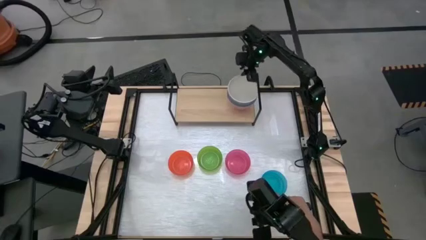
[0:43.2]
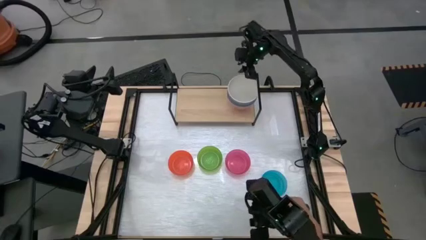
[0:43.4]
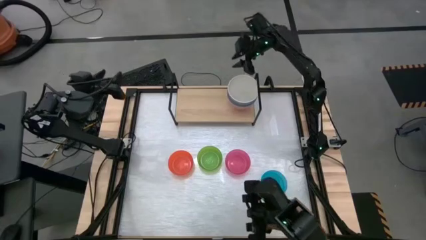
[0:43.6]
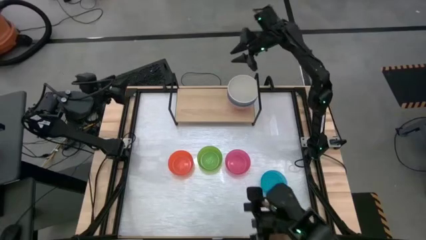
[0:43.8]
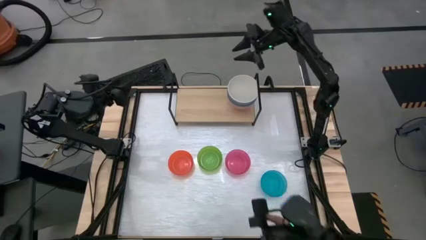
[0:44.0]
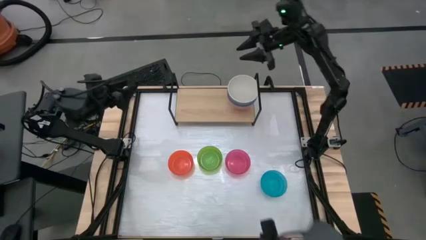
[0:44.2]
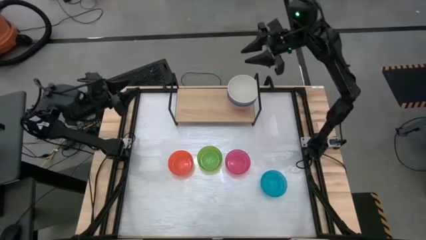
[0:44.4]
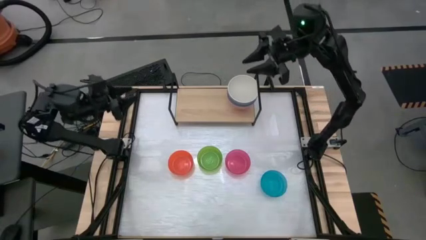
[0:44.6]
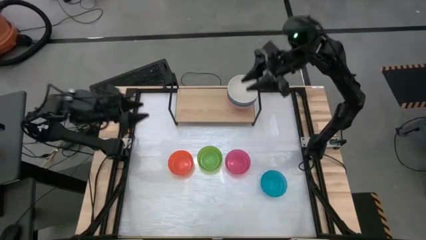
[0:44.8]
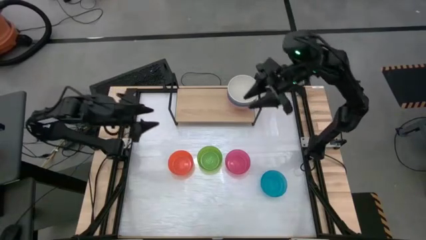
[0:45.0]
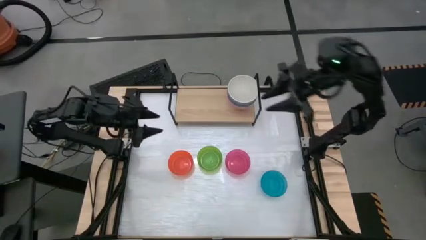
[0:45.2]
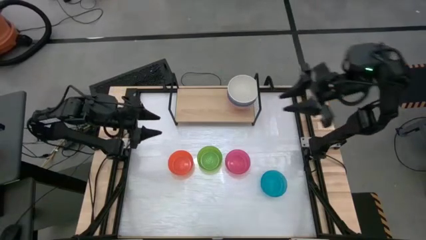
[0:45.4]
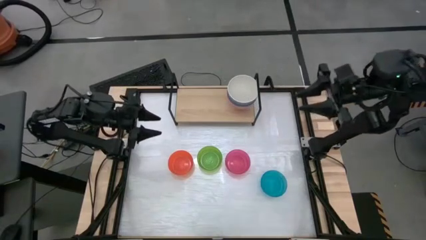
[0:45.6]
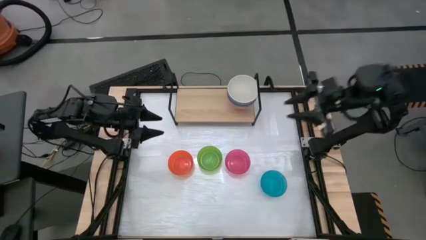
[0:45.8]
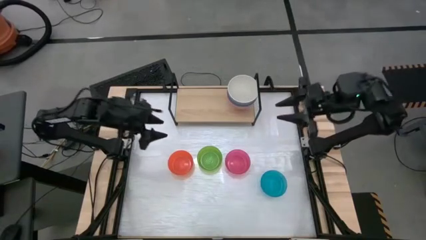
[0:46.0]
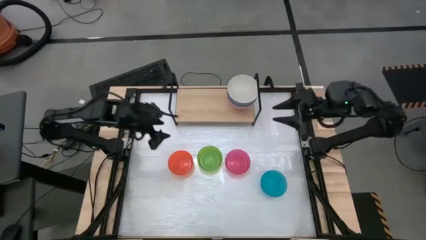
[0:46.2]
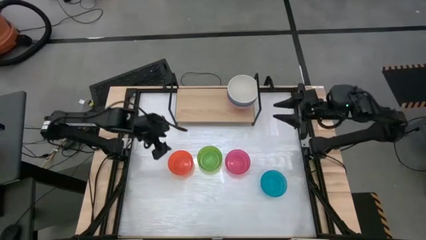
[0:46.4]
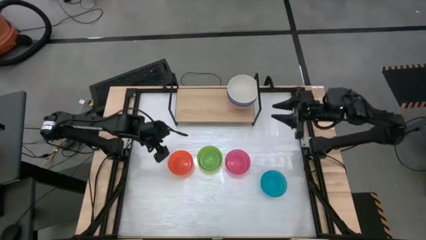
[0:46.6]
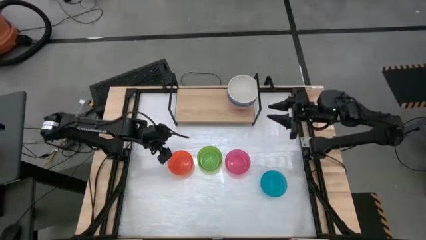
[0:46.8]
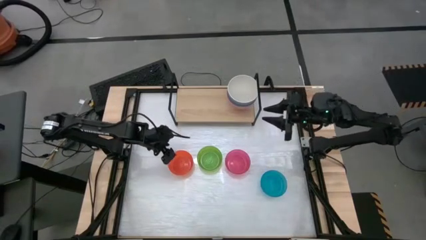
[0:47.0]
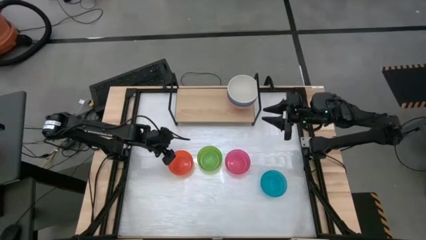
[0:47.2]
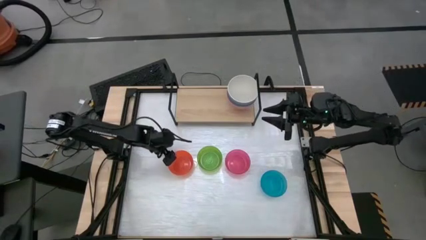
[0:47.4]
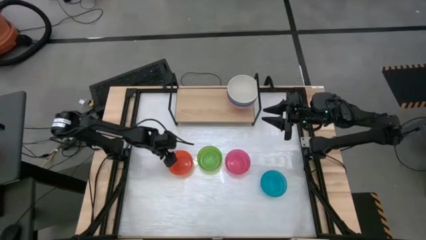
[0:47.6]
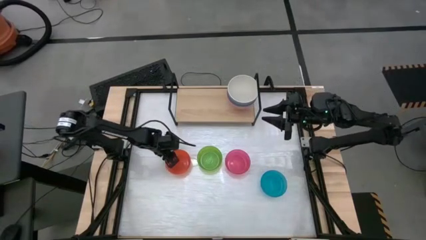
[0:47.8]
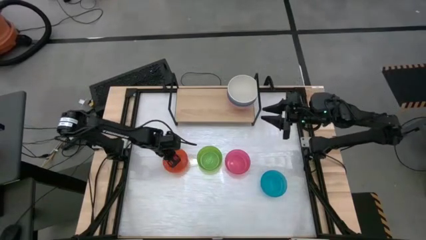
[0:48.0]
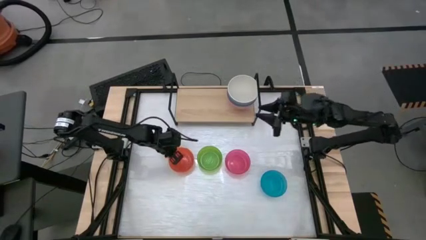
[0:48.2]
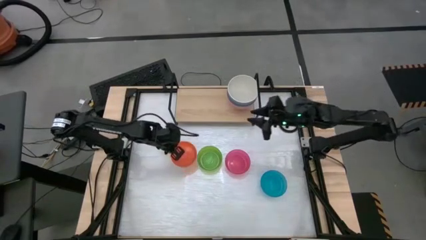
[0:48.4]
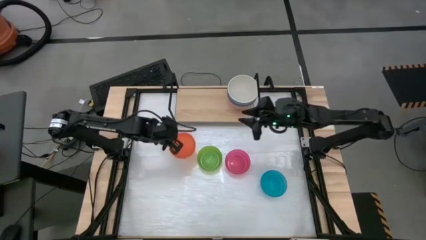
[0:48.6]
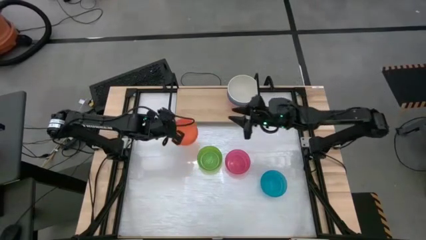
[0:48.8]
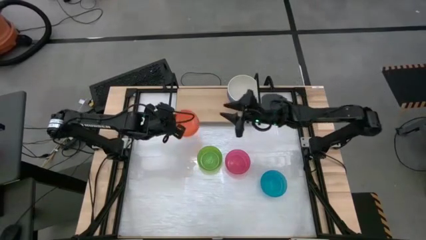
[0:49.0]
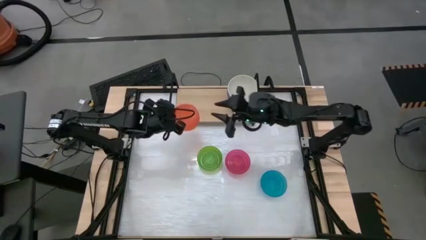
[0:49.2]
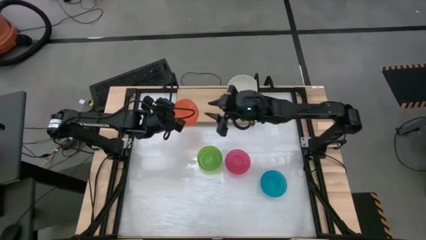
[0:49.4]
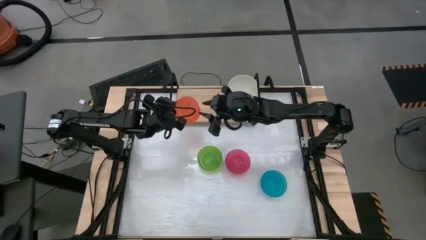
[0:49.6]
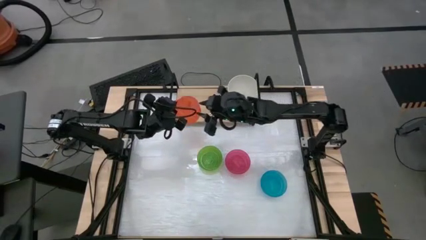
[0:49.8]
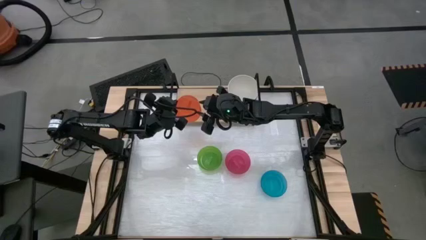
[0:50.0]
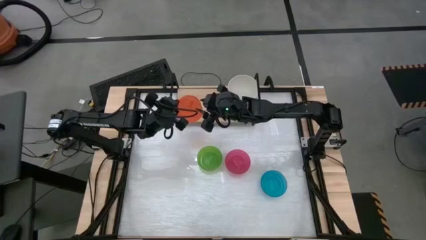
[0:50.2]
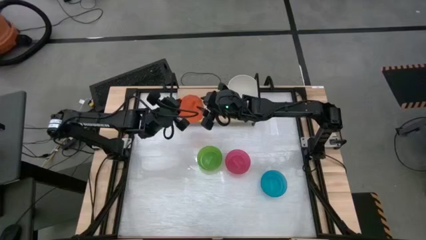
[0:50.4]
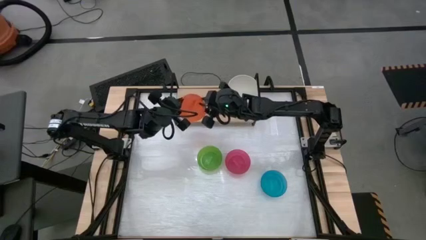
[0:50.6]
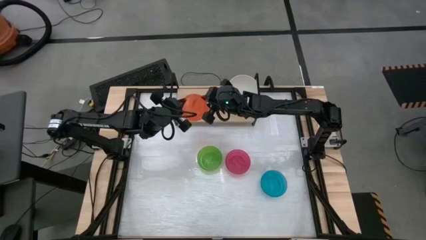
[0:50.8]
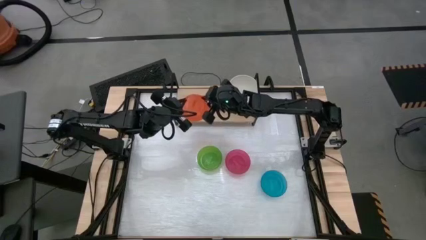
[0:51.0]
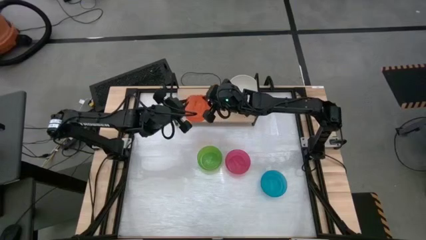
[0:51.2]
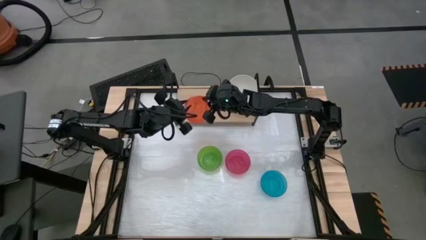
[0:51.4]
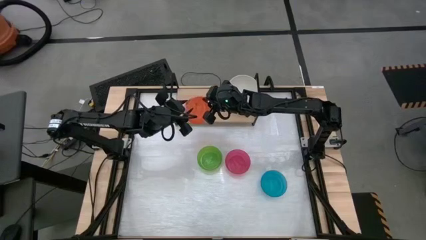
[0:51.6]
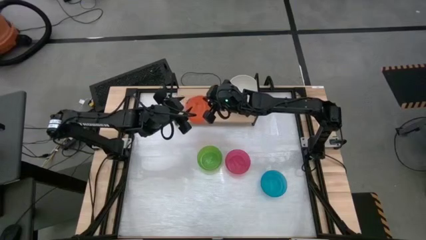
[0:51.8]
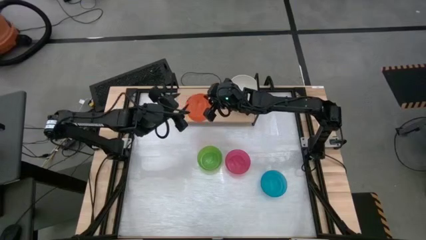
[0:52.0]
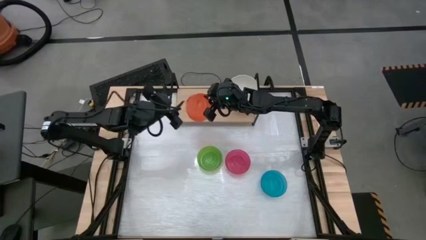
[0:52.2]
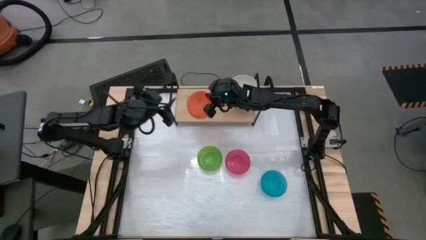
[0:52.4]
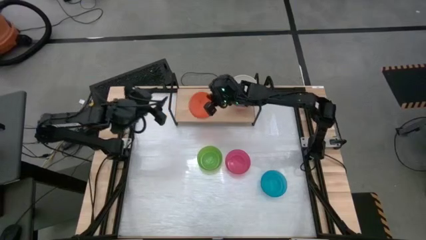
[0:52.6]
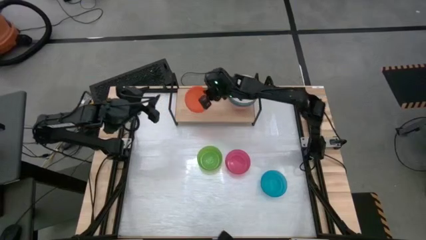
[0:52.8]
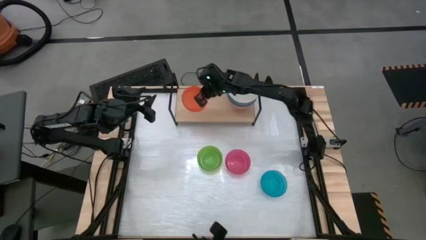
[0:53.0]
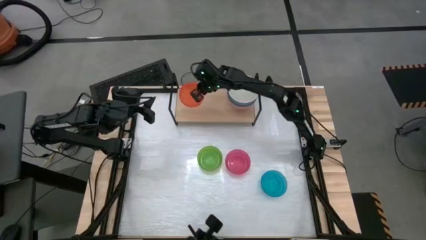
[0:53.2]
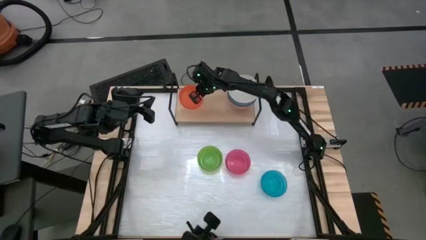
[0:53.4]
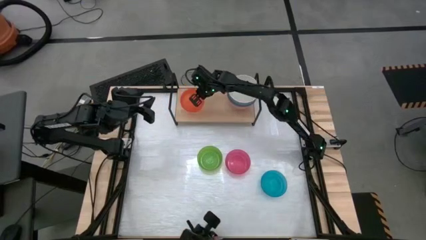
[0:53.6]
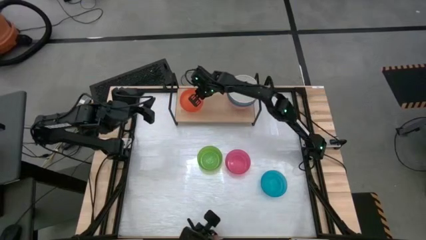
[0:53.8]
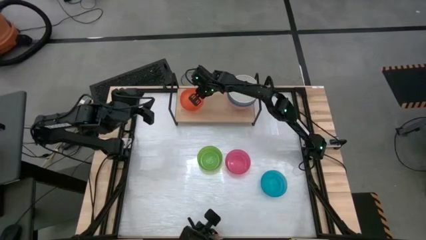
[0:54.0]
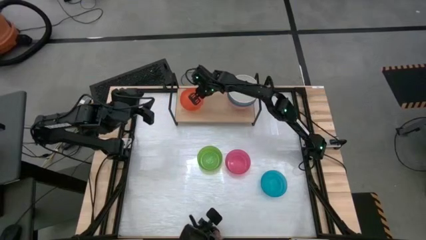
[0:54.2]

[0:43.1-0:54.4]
Task: Place and stack bowls onto a shelf
Put the orange bowl on the shelf
